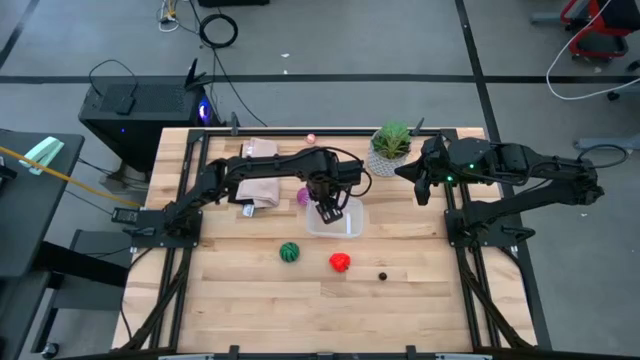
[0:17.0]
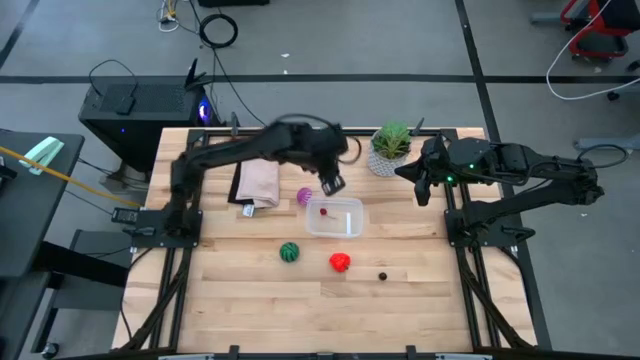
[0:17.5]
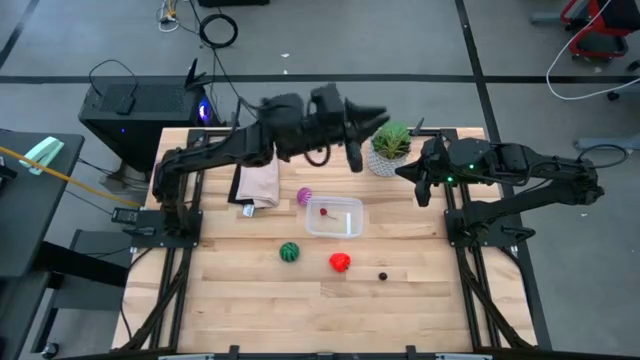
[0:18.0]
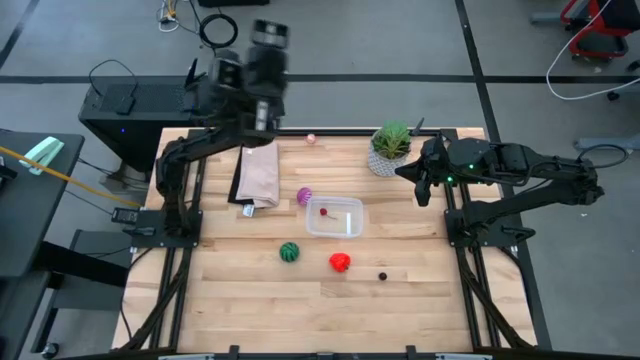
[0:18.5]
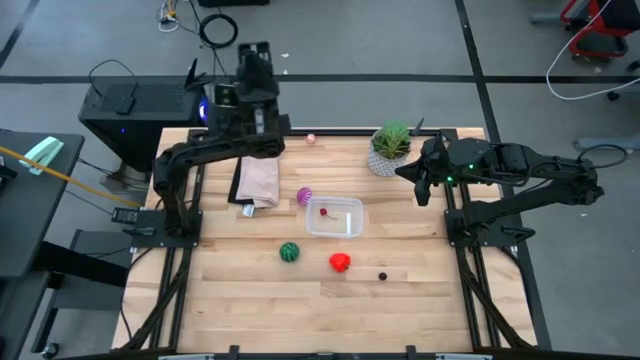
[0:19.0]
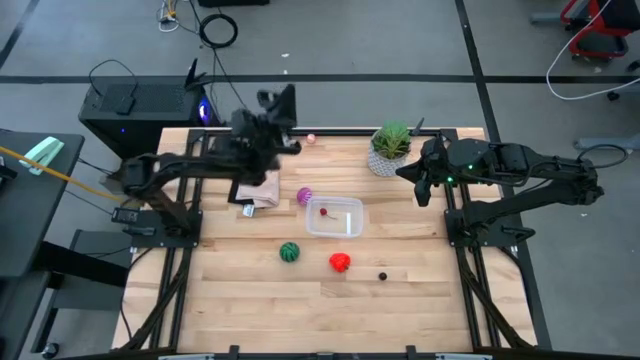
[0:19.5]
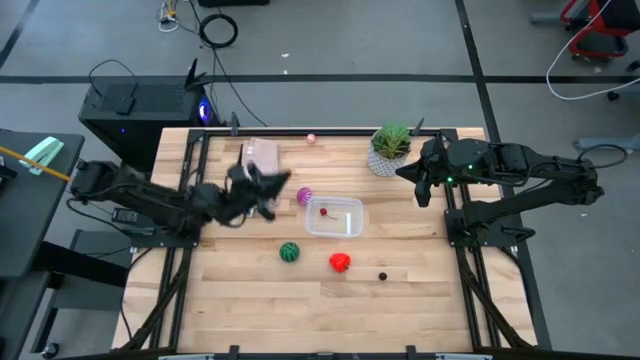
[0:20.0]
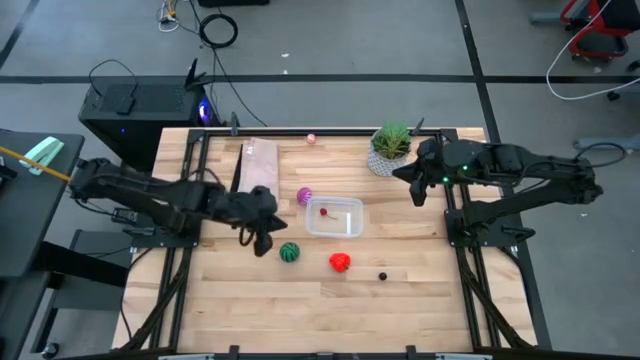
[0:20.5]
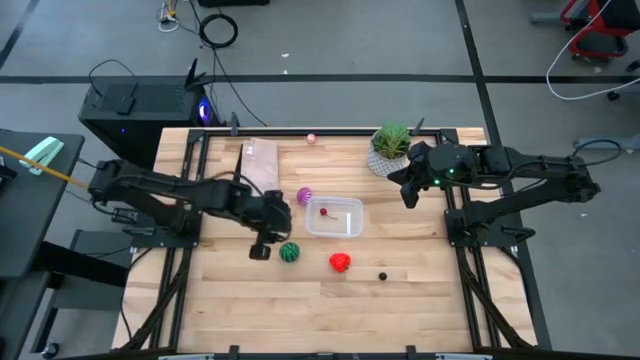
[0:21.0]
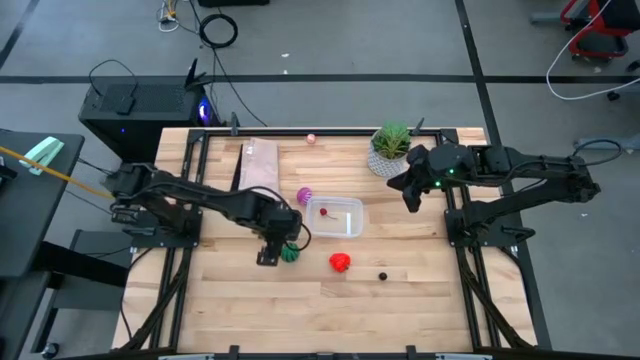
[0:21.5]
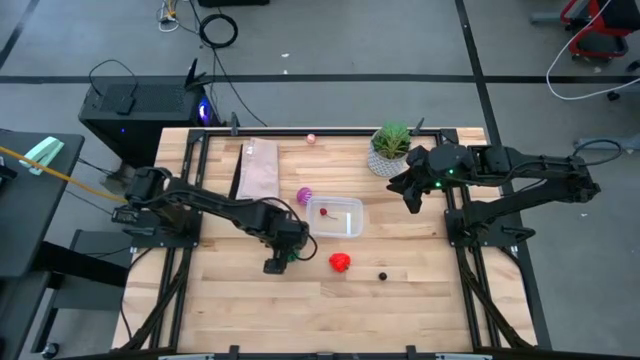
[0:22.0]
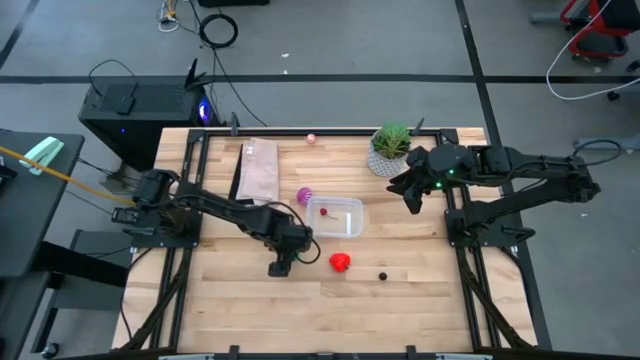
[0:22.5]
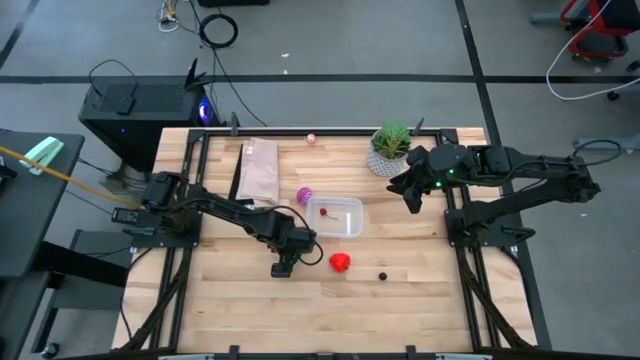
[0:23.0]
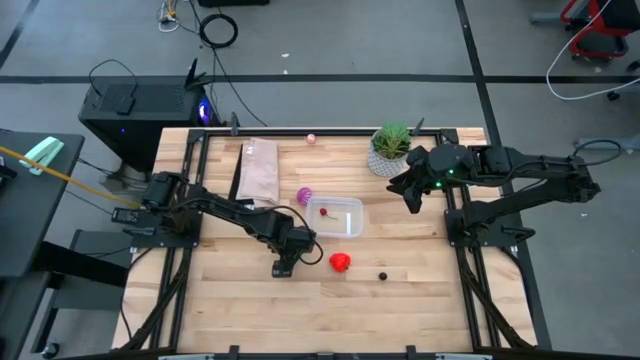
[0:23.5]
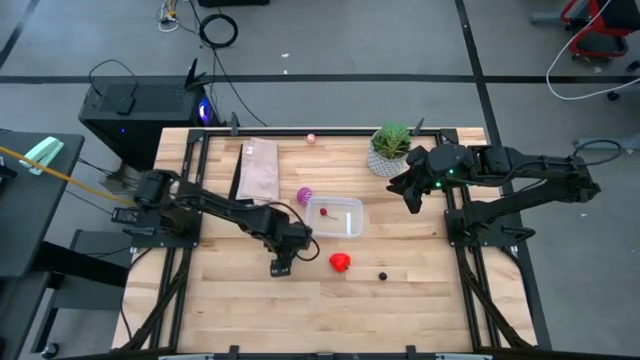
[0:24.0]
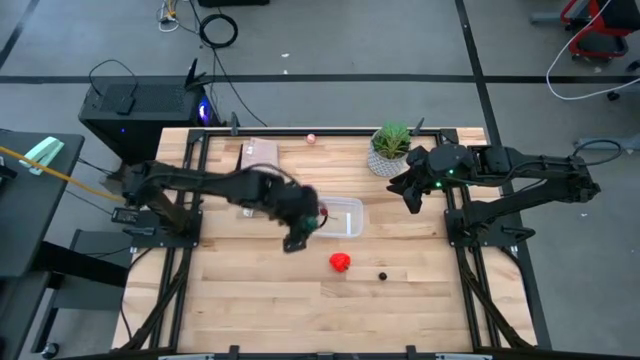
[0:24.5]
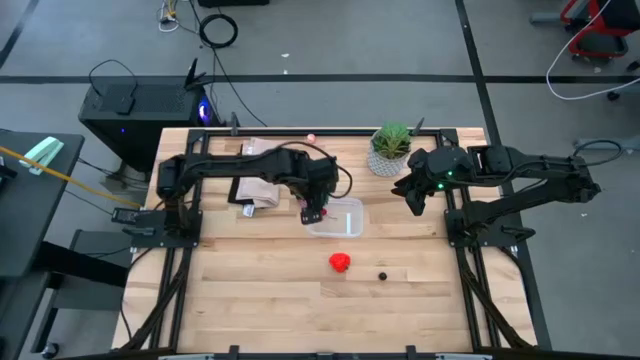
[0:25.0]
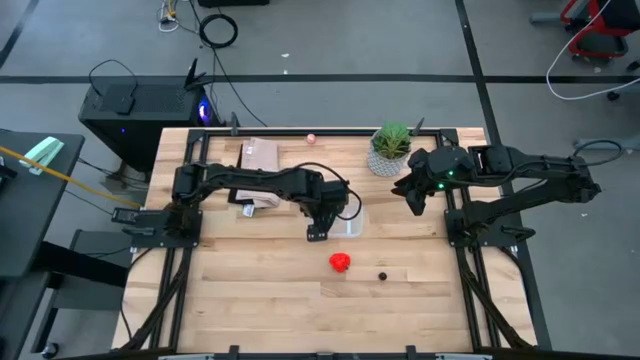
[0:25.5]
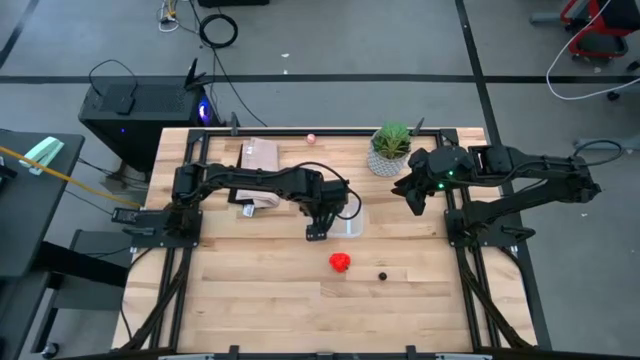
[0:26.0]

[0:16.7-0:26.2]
Task: Pick and placing Produce into tupperware
Put the watermelon into the transparent bin

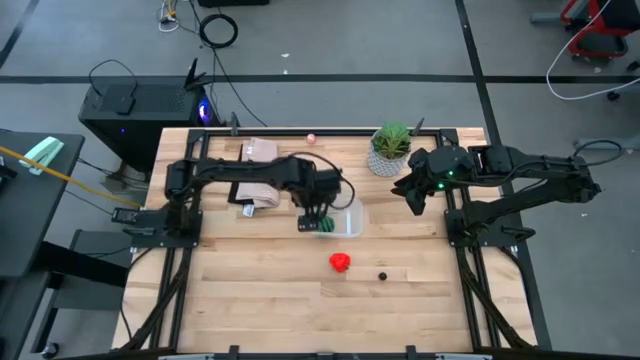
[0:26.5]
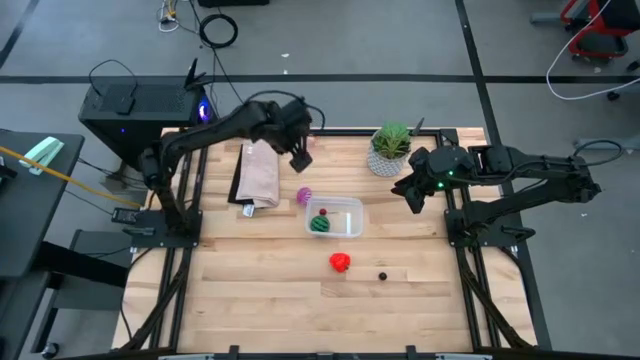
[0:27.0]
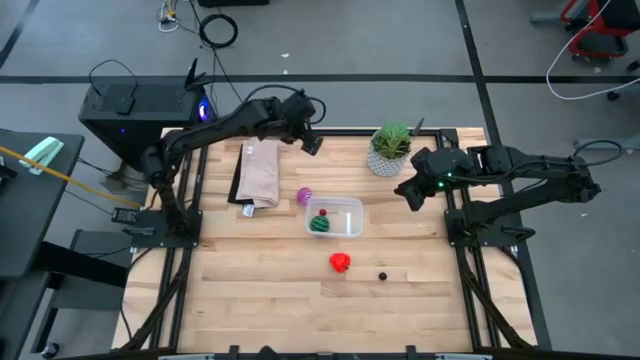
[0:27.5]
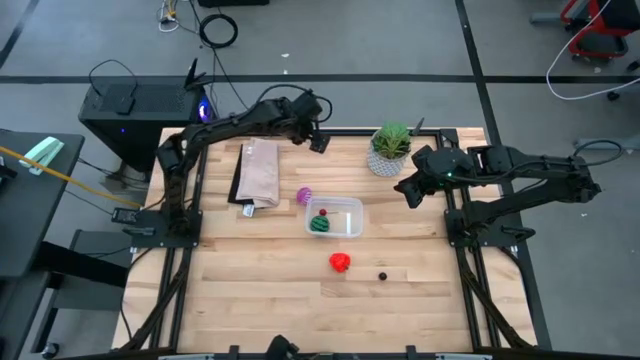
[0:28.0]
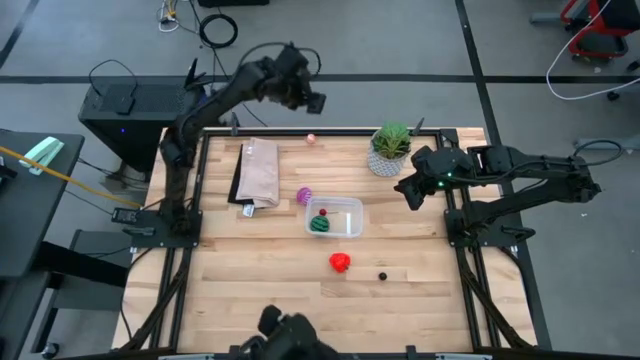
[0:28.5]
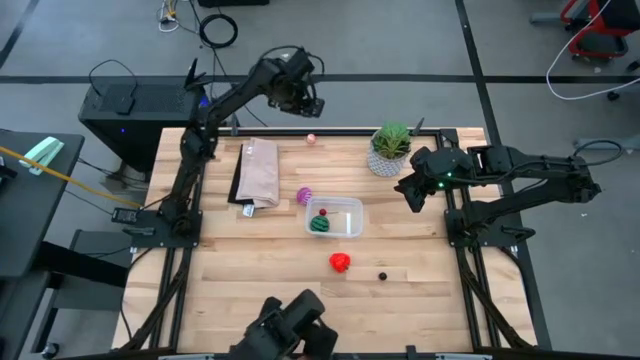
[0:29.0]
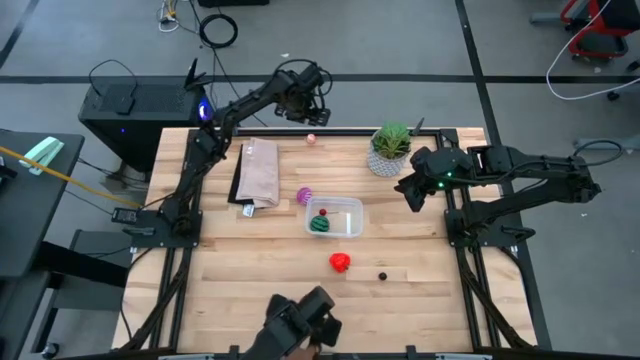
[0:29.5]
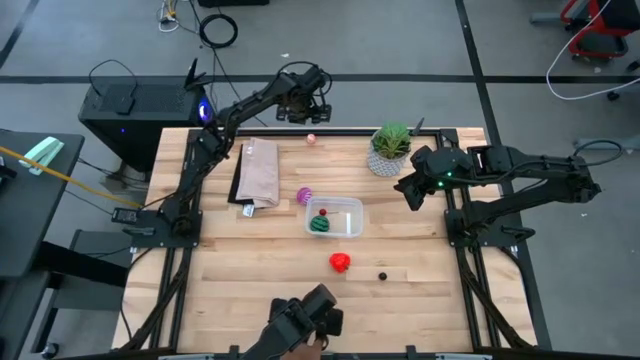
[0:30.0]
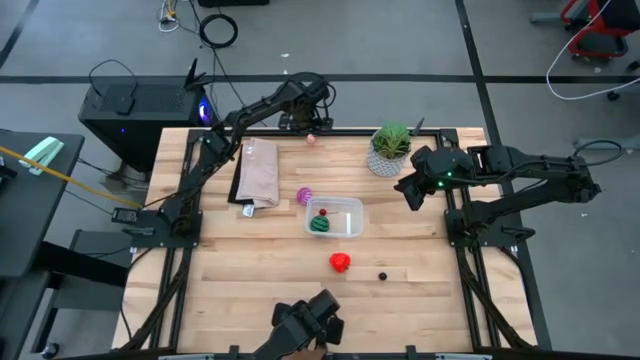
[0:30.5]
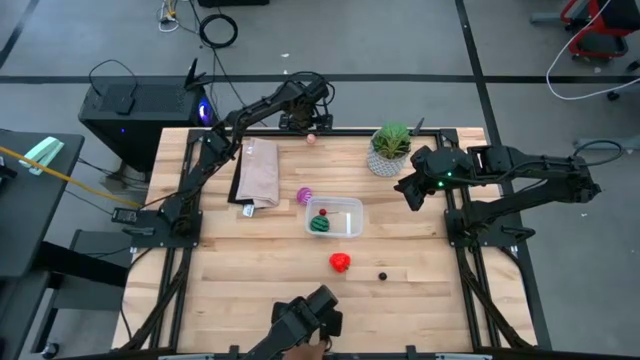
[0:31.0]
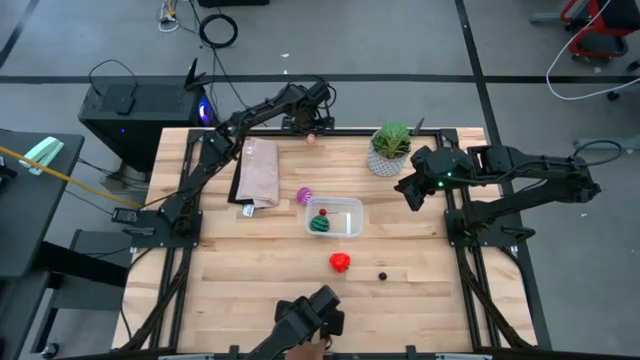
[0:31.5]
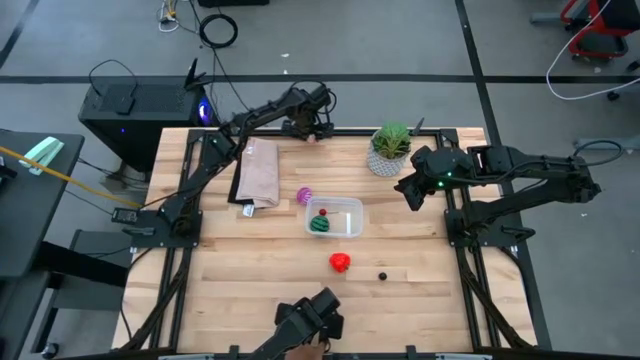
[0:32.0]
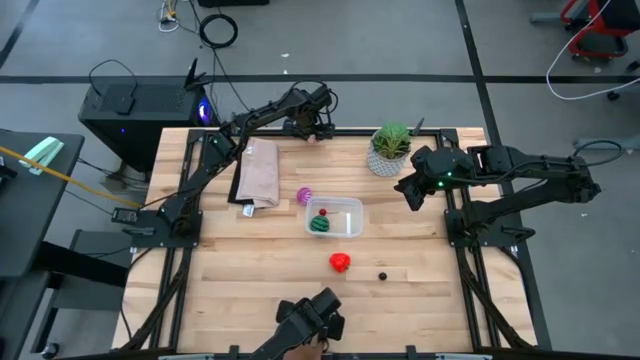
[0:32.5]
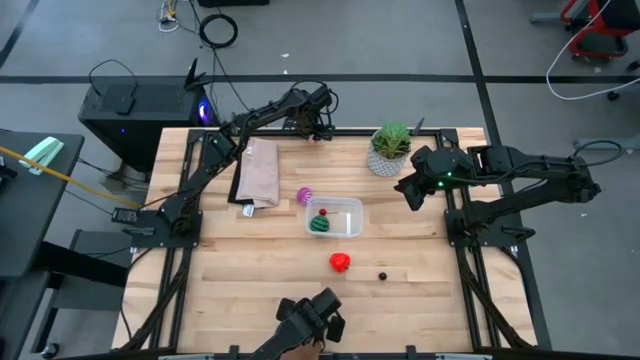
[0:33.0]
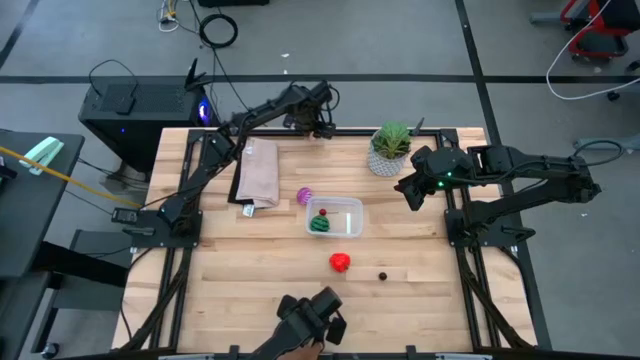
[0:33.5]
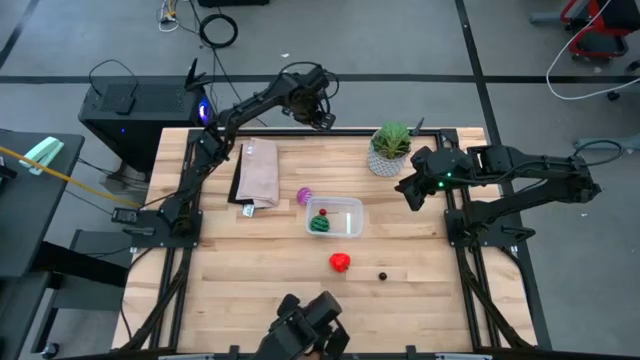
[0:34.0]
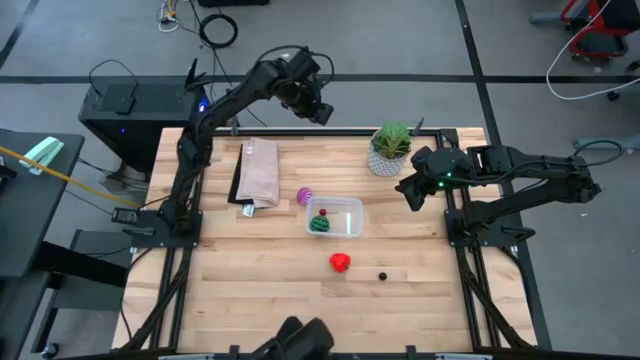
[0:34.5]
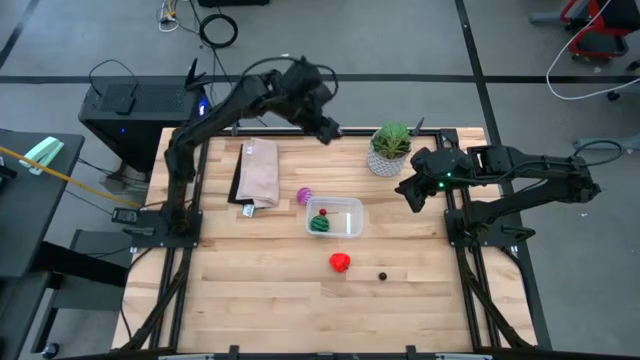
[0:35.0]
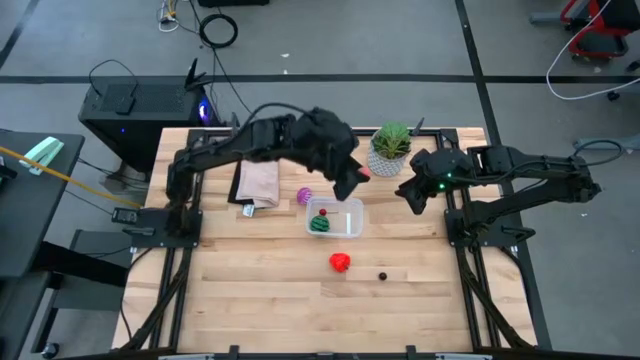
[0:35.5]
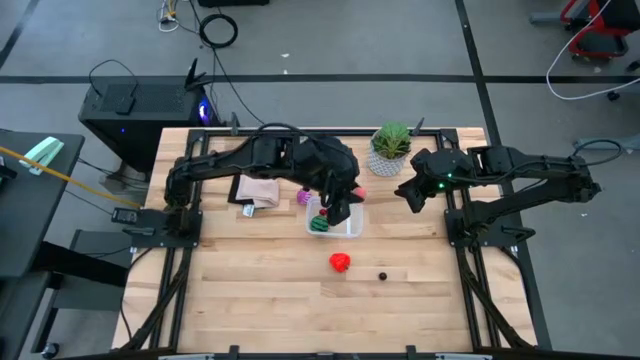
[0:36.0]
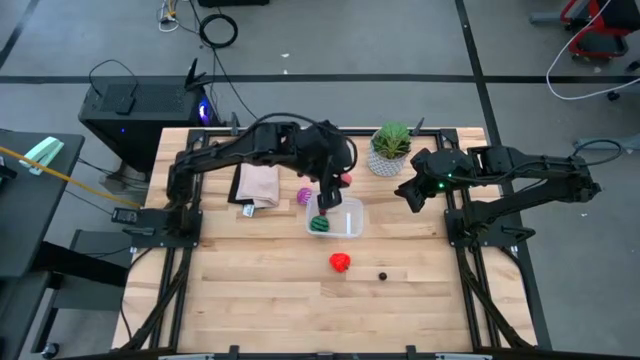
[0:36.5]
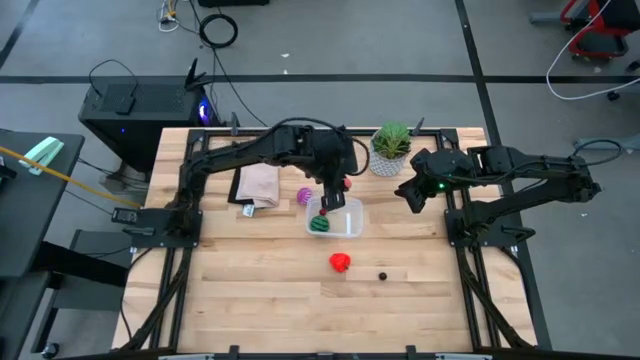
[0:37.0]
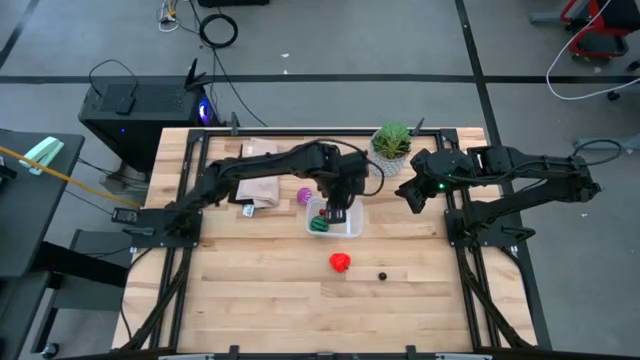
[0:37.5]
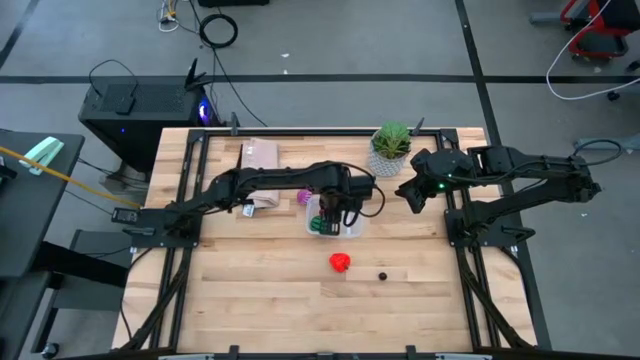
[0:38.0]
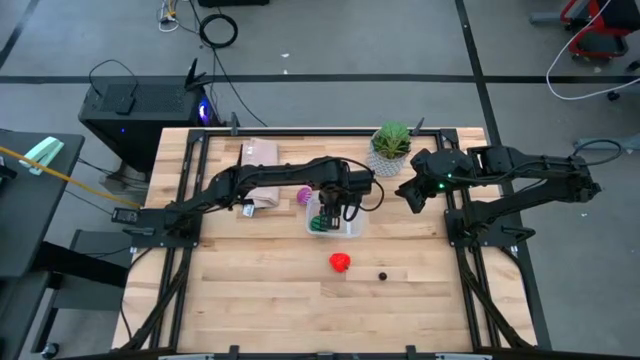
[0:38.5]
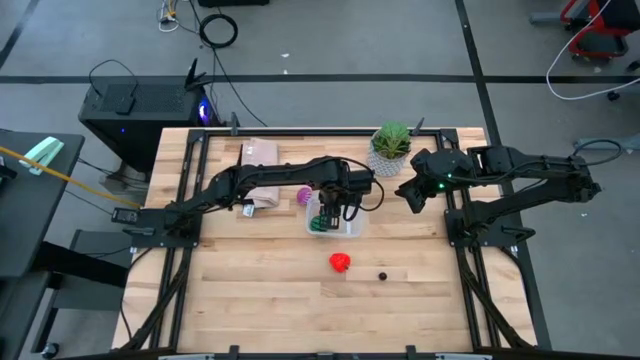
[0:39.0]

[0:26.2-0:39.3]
Put the peach into the transparent bin
